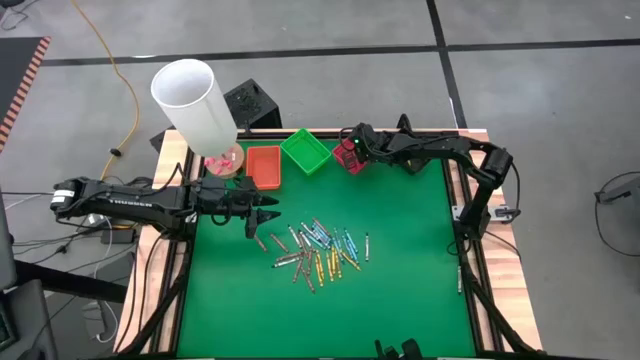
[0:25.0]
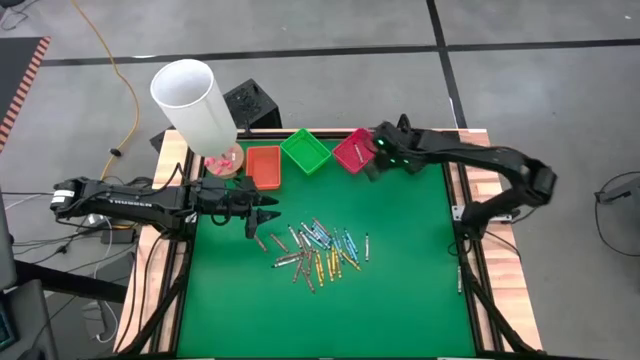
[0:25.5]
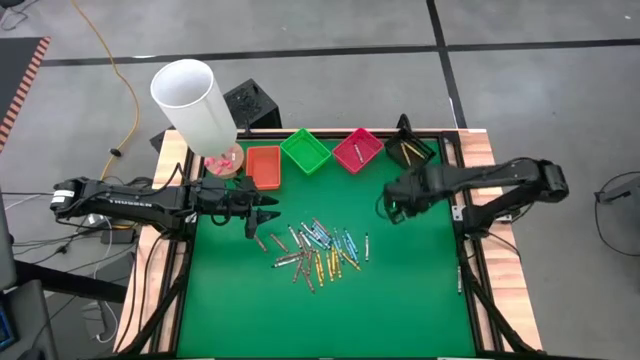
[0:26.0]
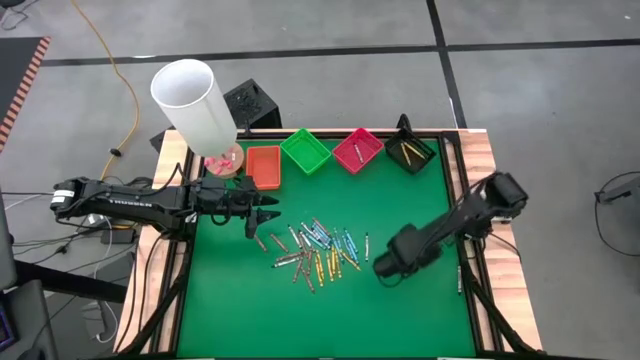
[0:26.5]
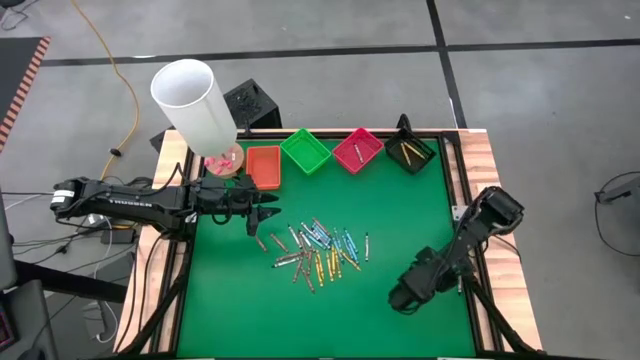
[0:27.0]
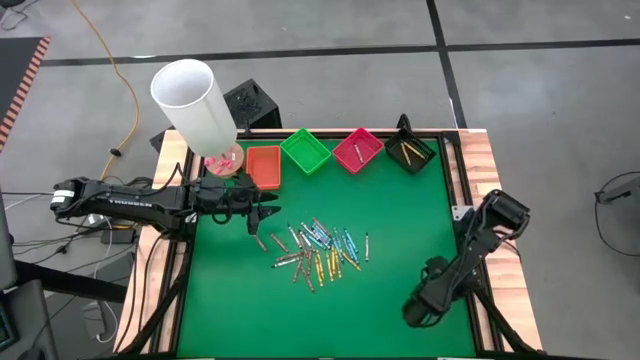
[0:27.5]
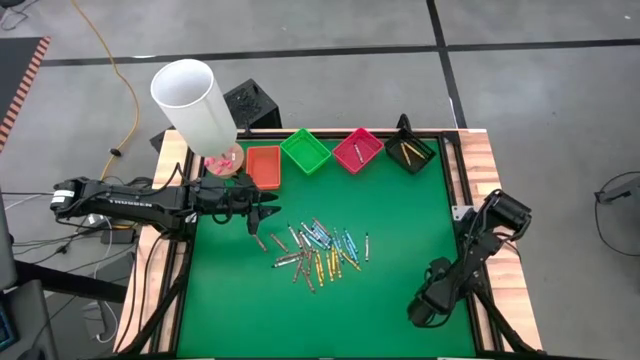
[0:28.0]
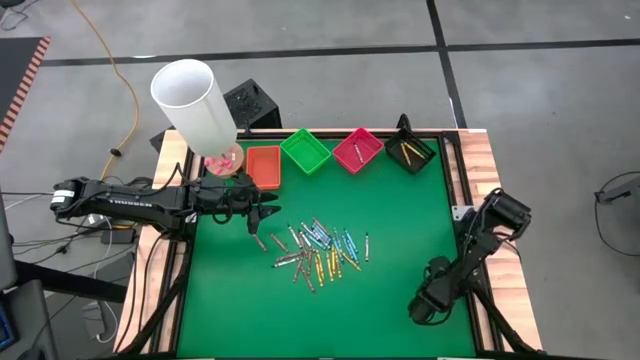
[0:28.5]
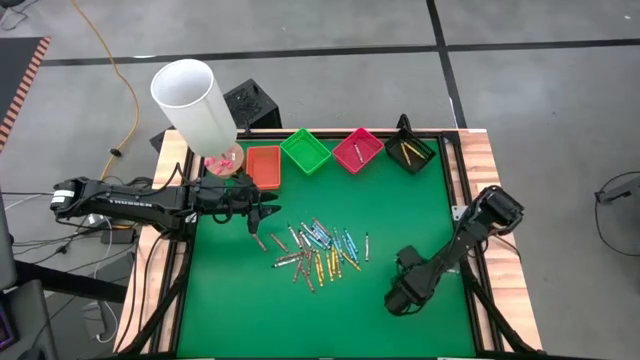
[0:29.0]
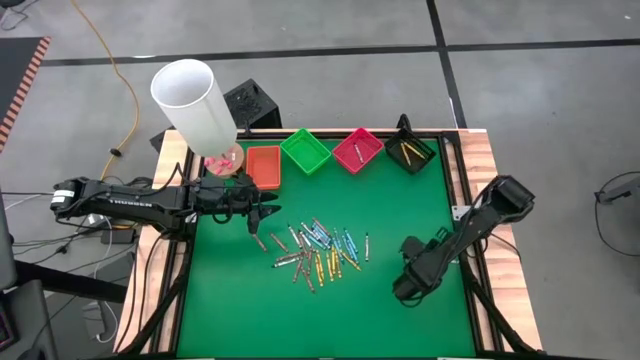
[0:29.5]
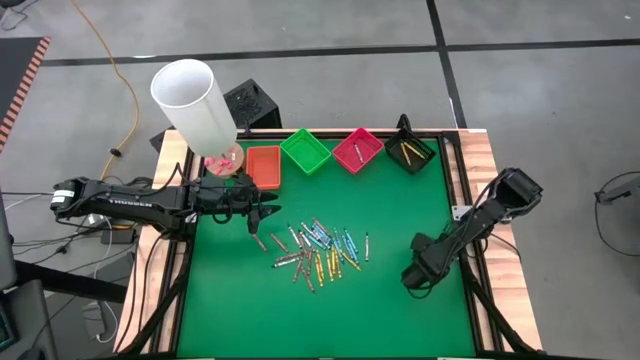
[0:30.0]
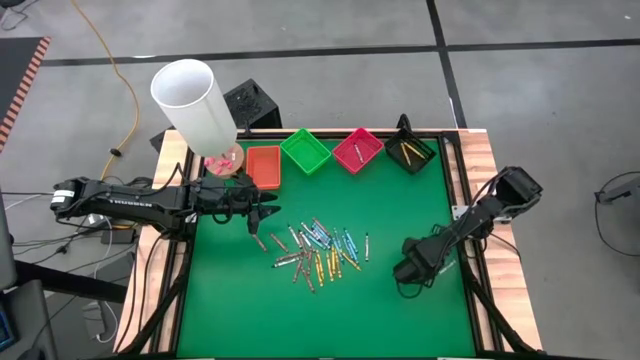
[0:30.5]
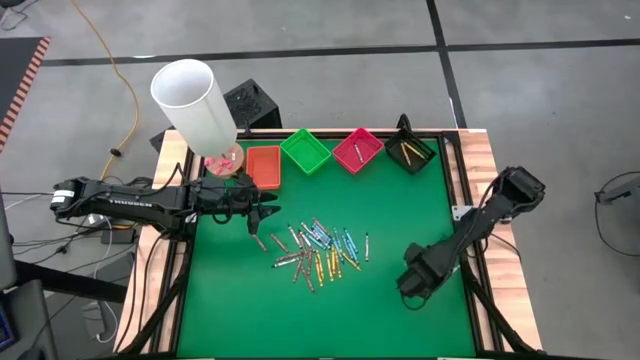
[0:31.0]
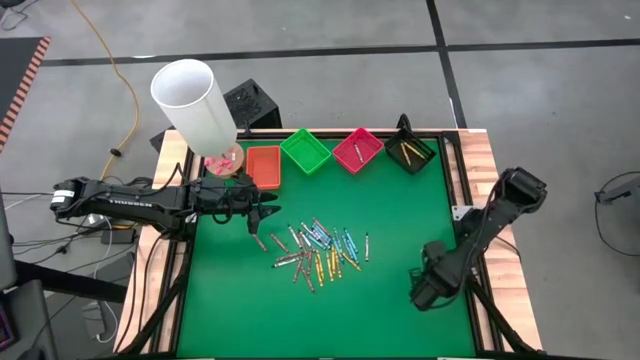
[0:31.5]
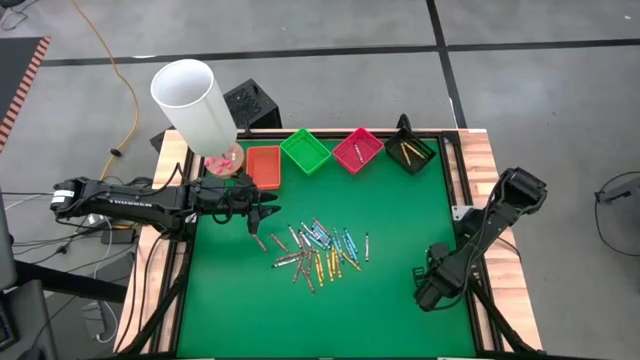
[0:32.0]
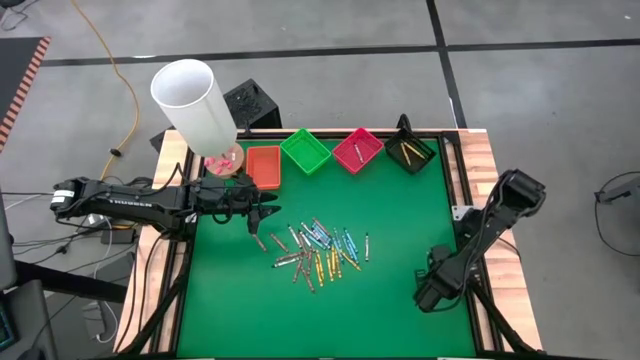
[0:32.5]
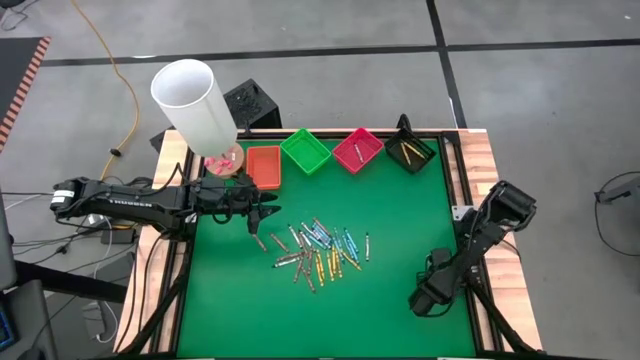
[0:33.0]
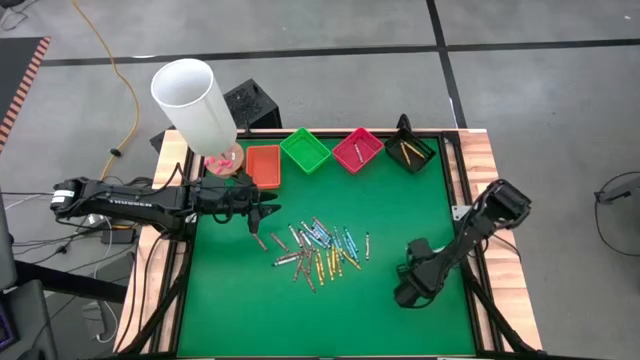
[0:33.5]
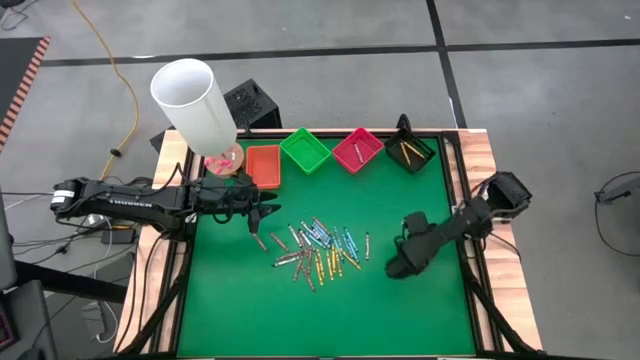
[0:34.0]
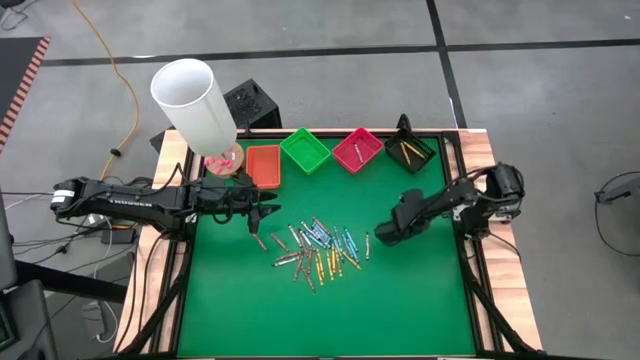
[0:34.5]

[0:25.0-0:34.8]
Task: Sort crayons
Put the black crayon into the red bin

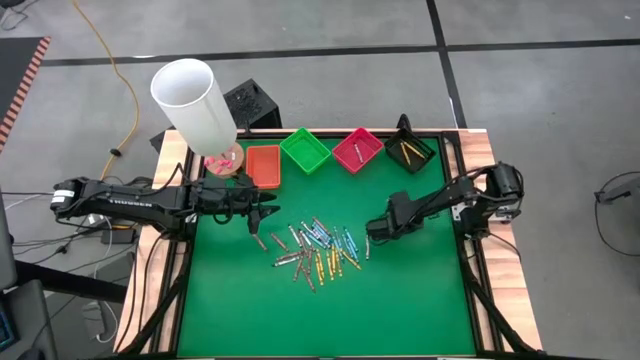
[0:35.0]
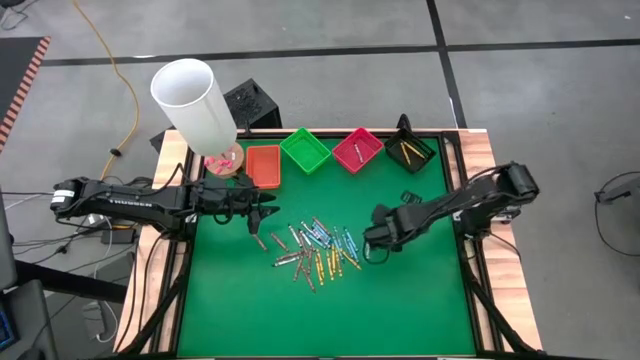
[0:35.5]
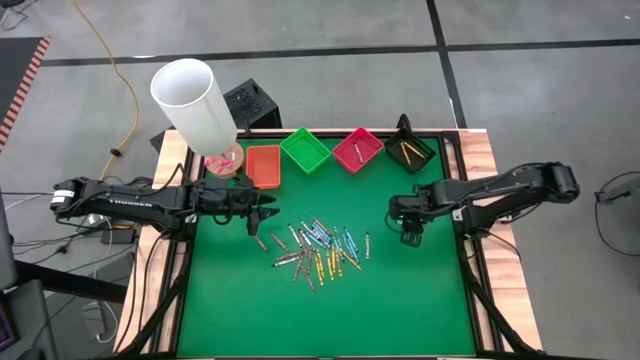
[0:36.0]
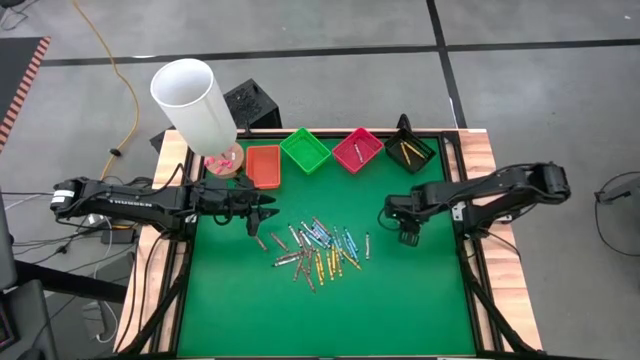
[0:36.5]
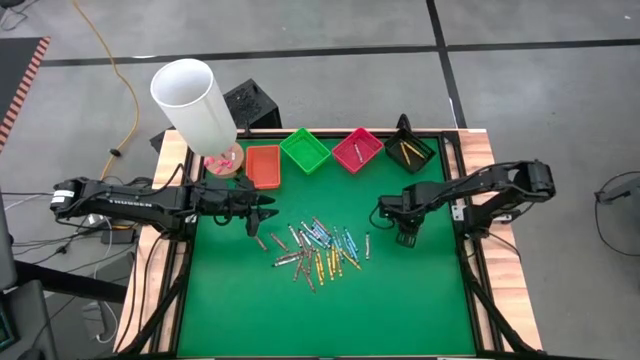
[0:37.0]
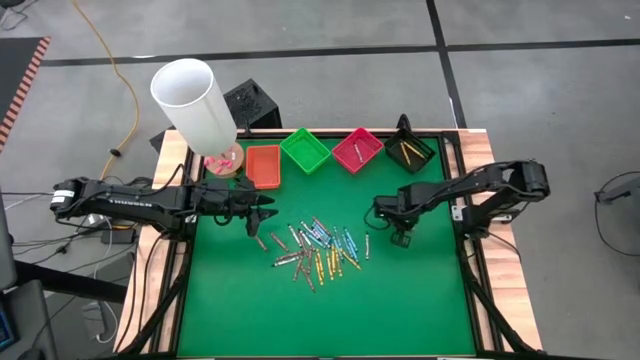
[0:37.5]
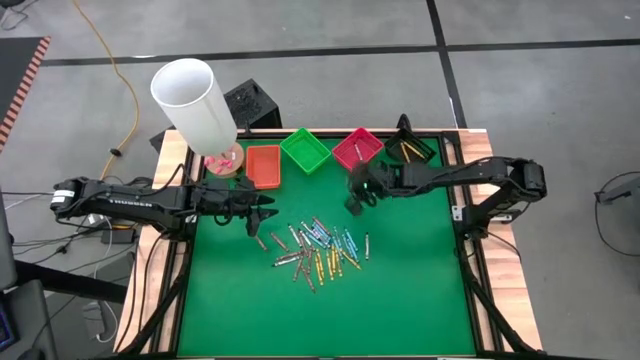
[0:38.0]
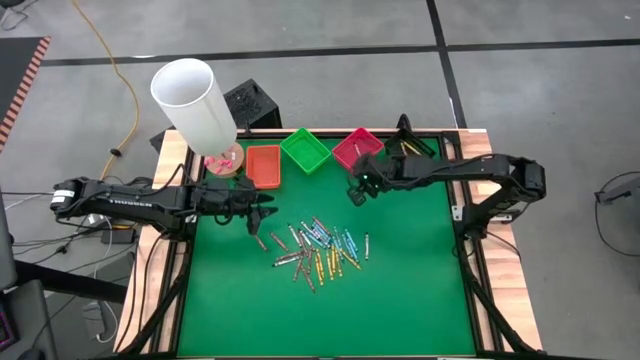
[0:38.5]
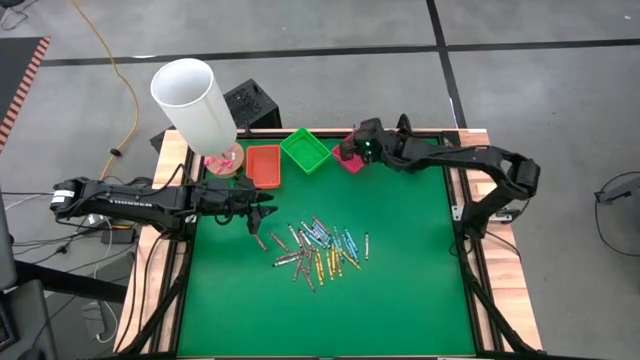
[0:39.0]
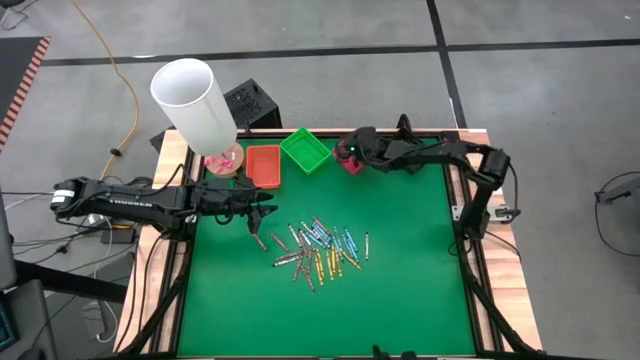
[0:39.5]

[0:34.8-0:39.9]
Put the black crayon into the red bin

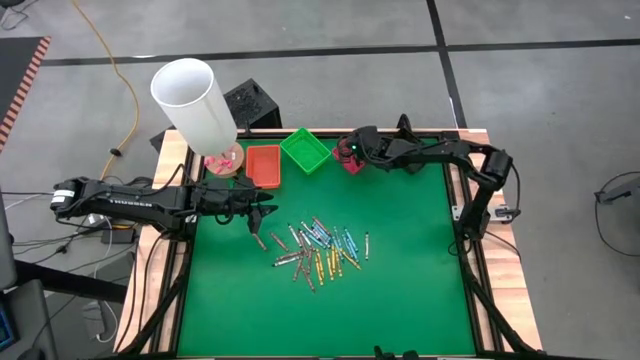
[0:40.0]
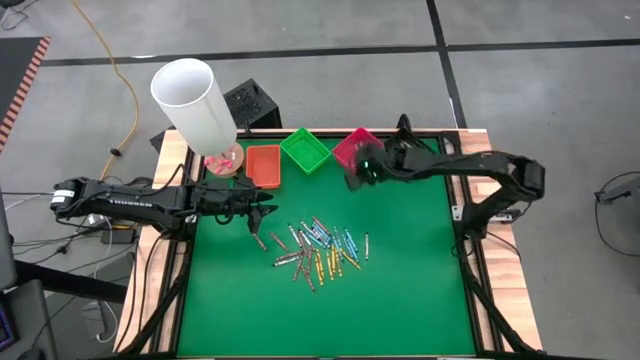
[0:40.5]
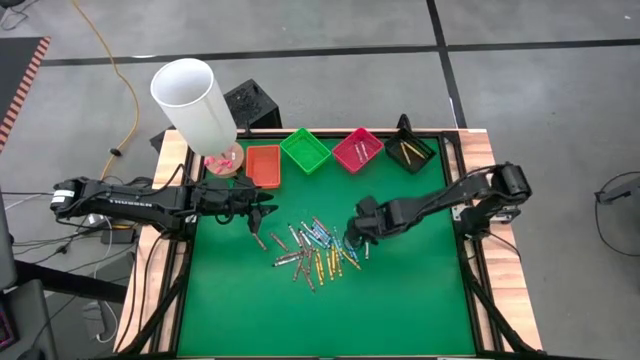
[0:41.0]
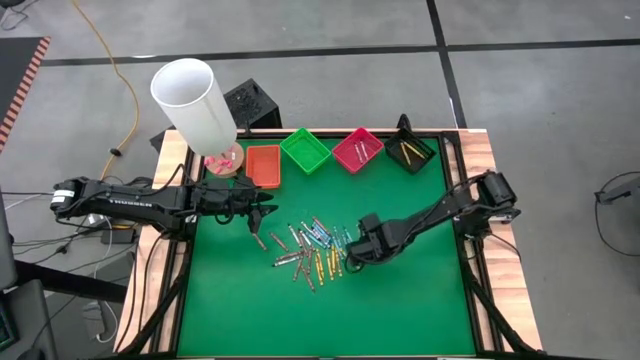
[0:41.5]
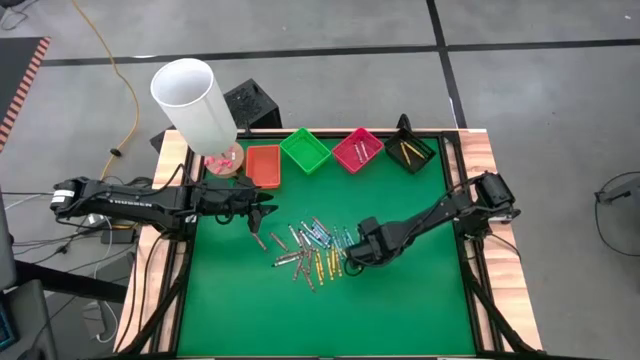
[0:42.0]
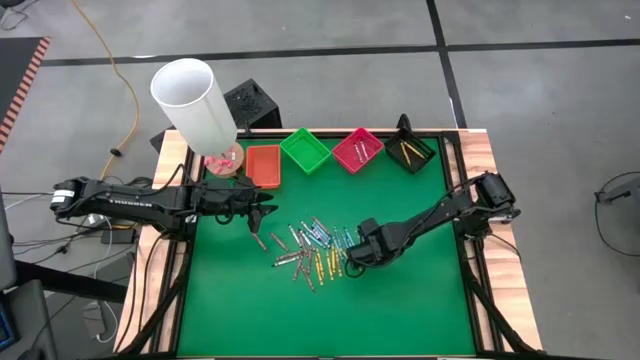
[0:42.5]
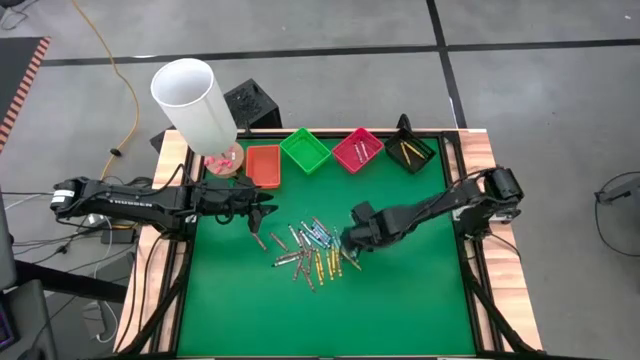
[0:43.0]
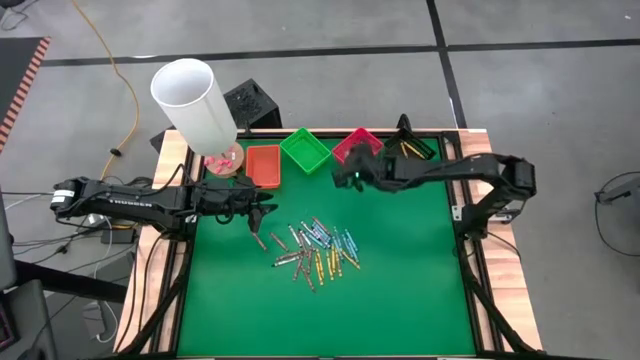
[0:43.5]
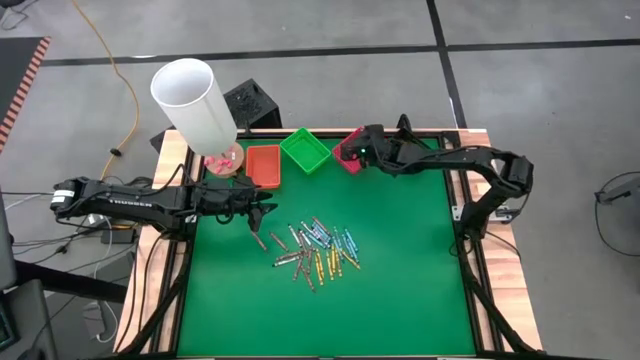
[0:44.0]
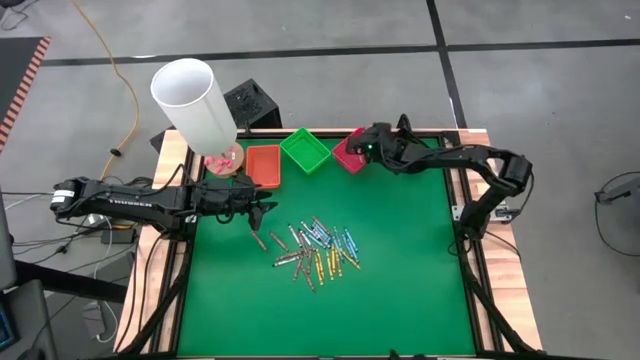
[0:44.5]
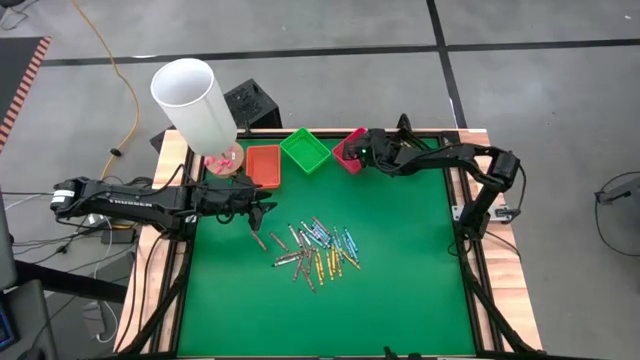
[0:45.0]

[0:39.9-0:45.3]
Put the black crayon into the red bin

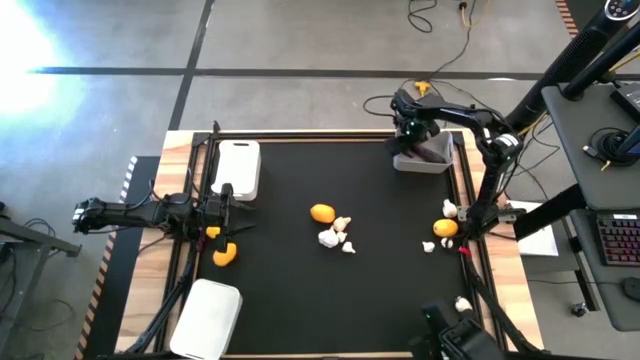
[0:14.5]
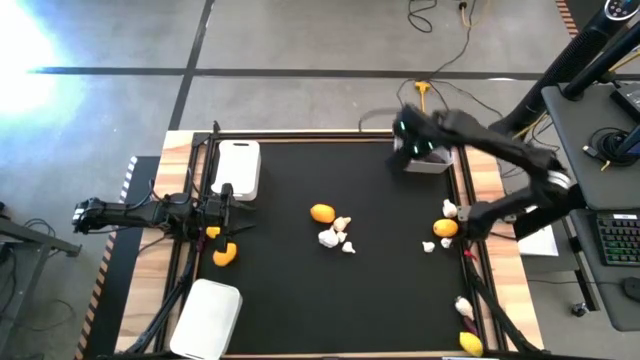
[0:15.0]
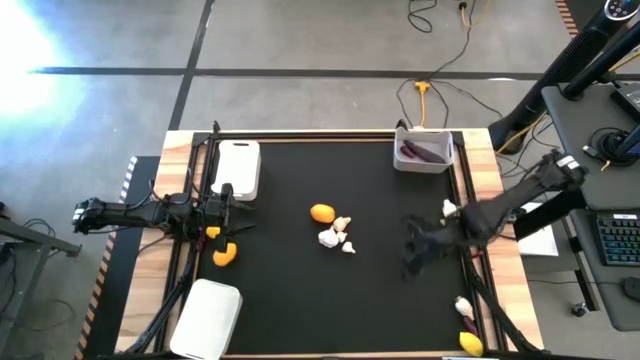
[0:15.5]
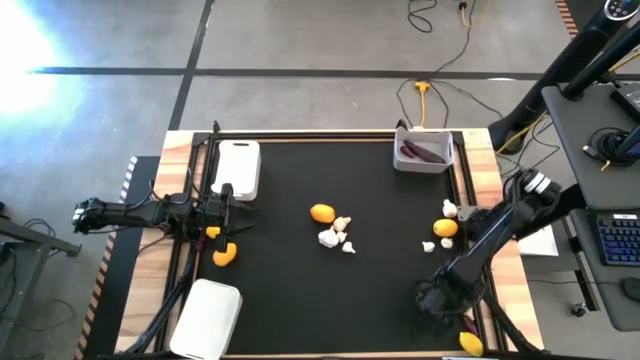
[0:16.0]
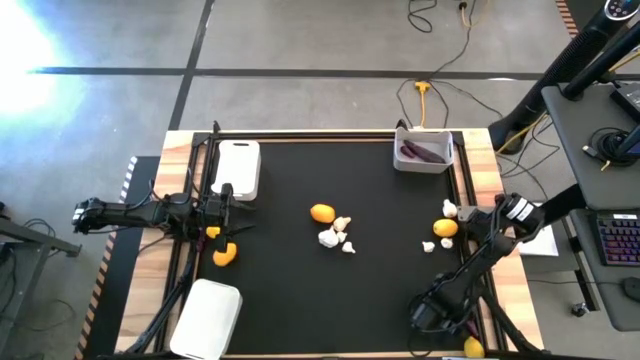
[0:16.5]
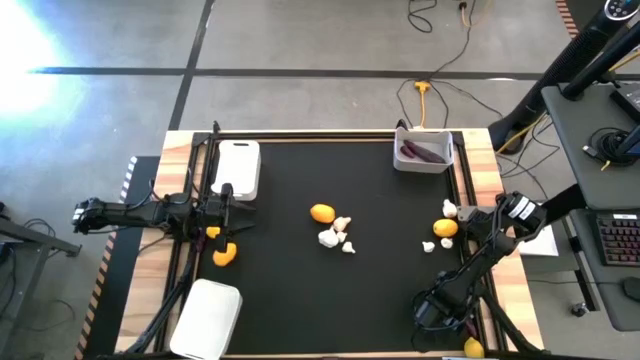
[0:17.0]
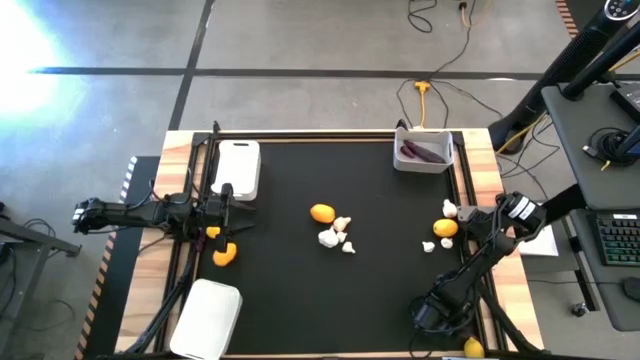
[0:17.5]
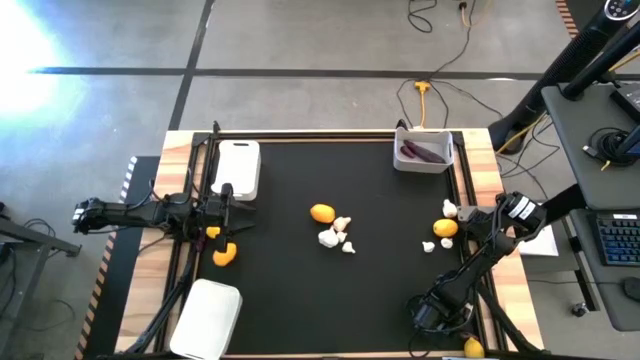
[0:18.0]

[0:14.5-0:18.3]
Task: Sort produce into baskets
Put the small eggplant into the gray bin
